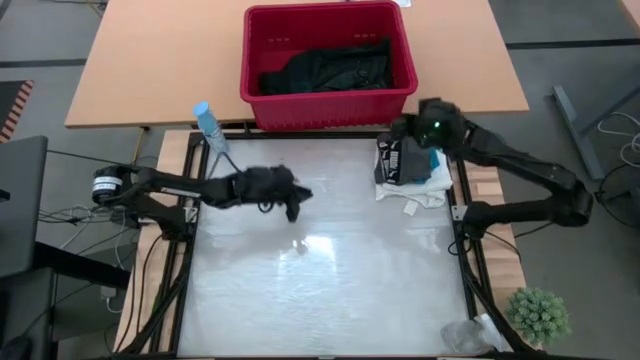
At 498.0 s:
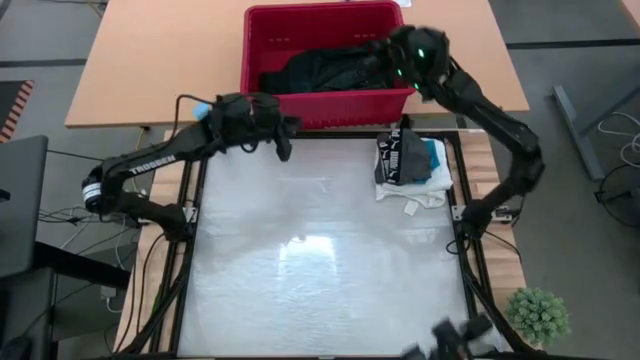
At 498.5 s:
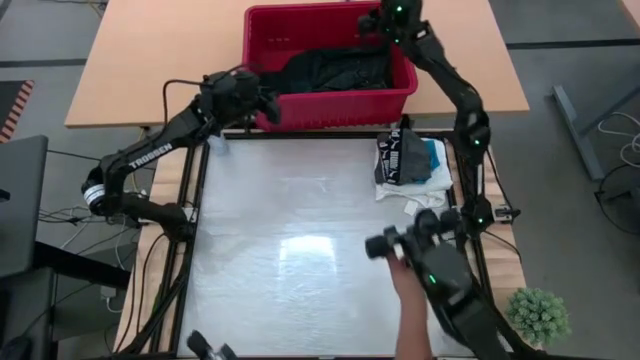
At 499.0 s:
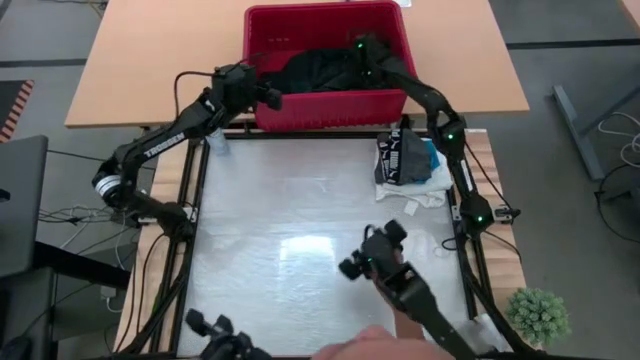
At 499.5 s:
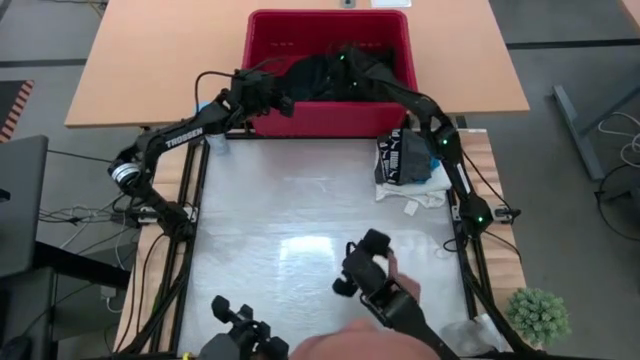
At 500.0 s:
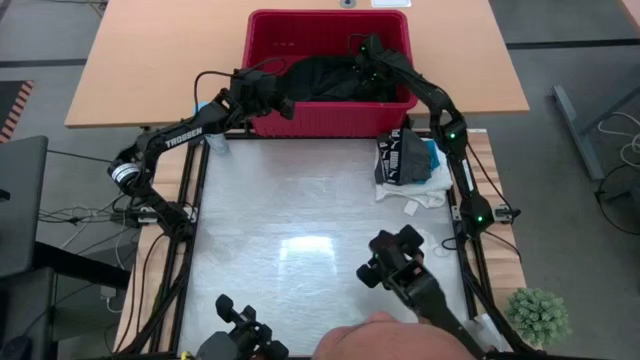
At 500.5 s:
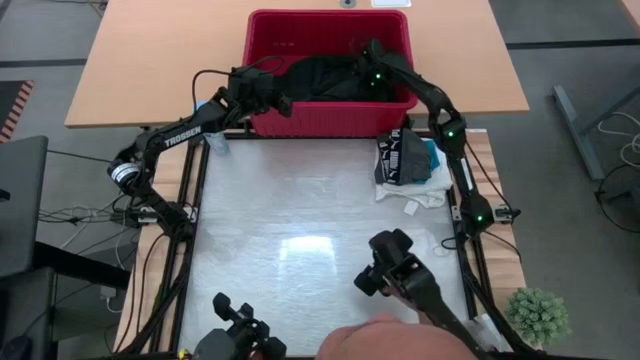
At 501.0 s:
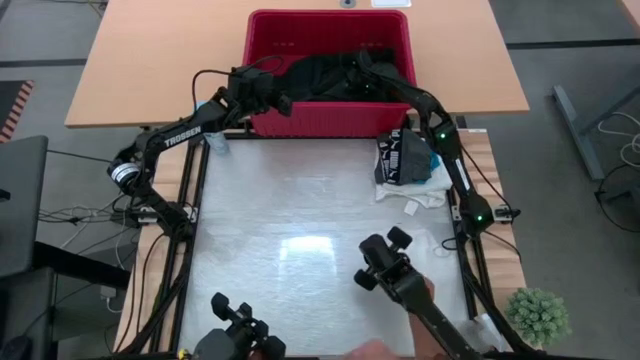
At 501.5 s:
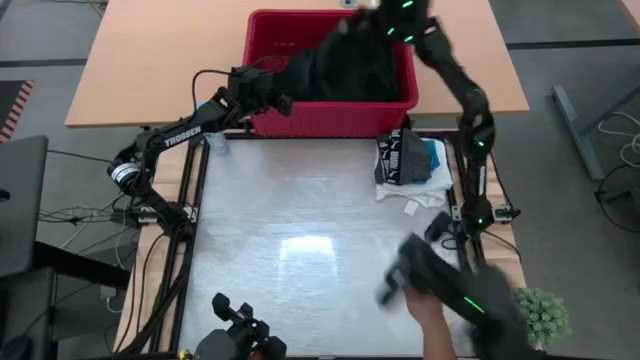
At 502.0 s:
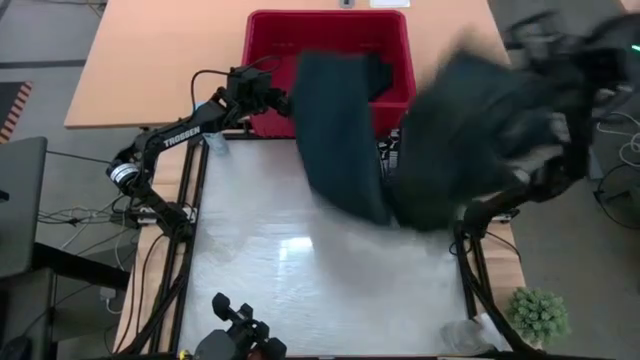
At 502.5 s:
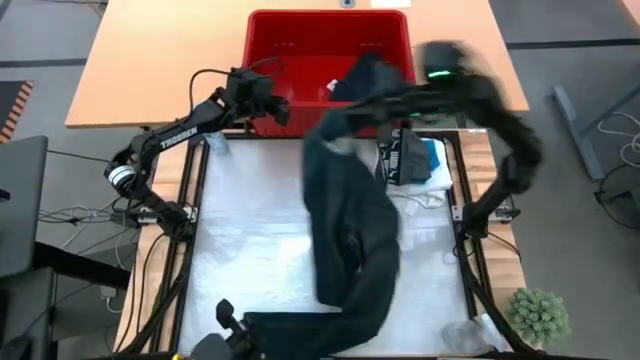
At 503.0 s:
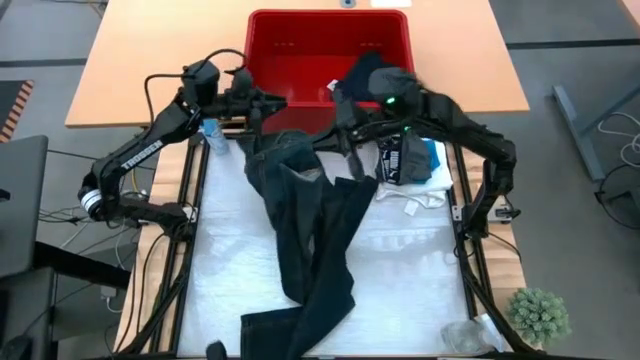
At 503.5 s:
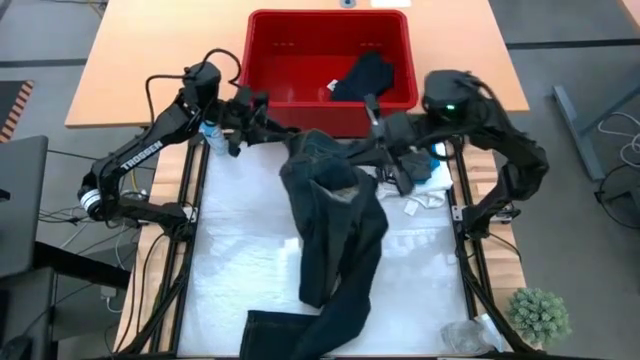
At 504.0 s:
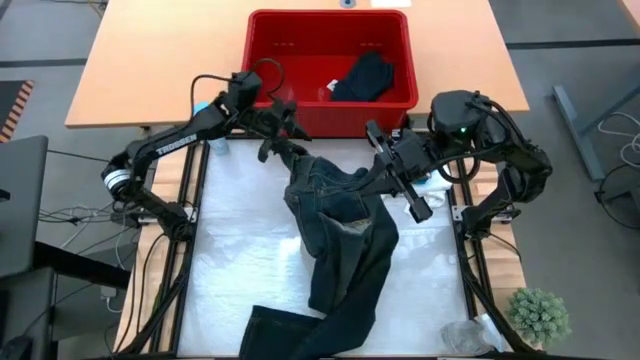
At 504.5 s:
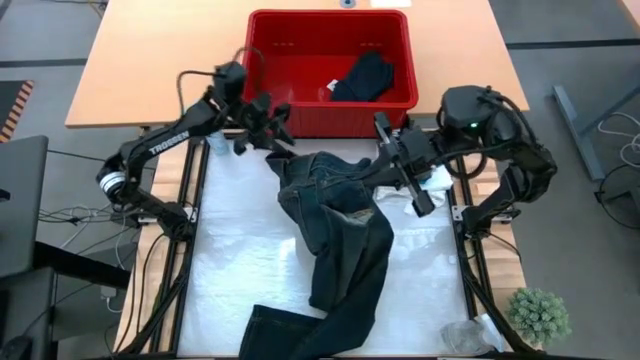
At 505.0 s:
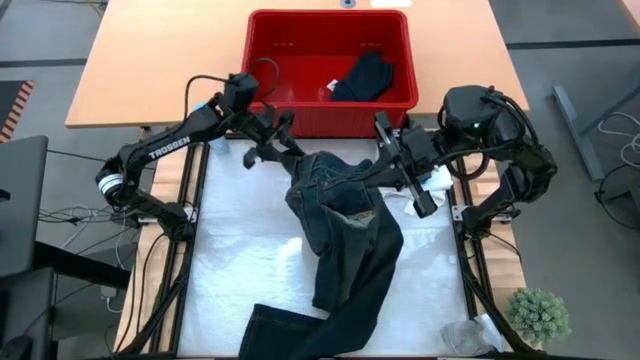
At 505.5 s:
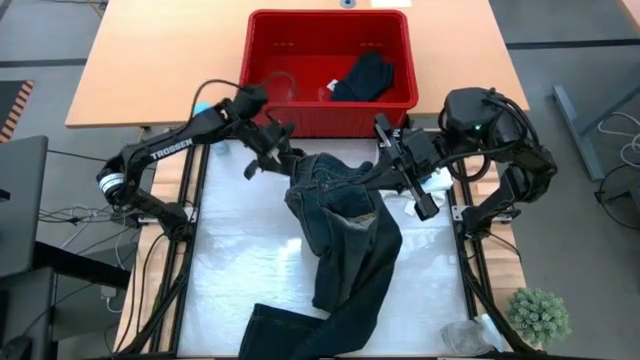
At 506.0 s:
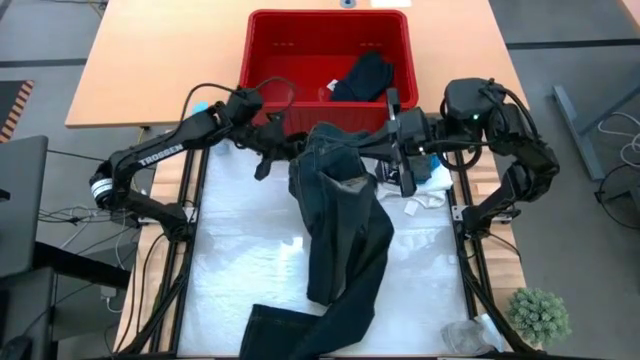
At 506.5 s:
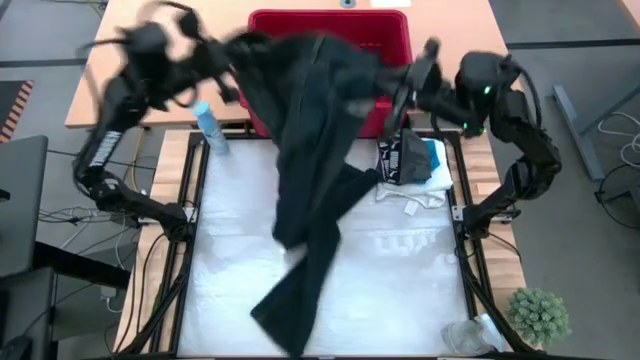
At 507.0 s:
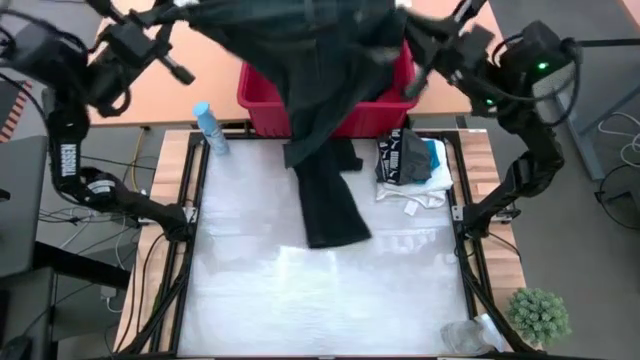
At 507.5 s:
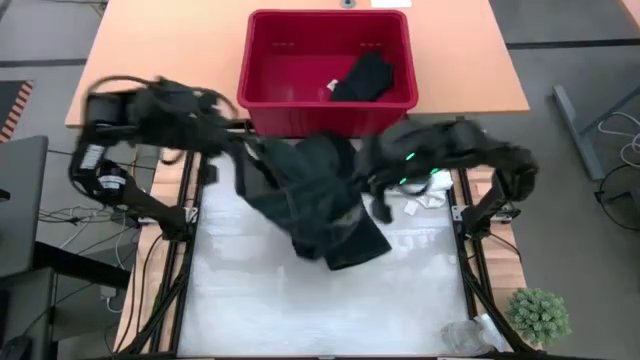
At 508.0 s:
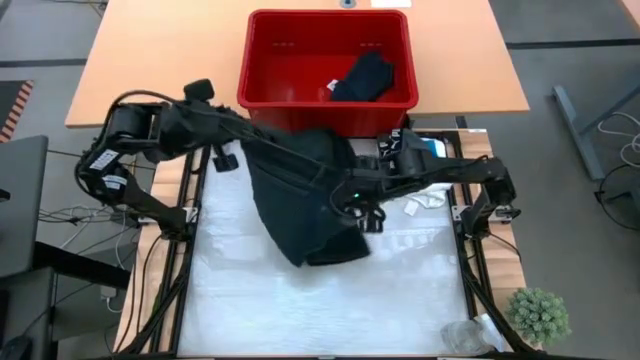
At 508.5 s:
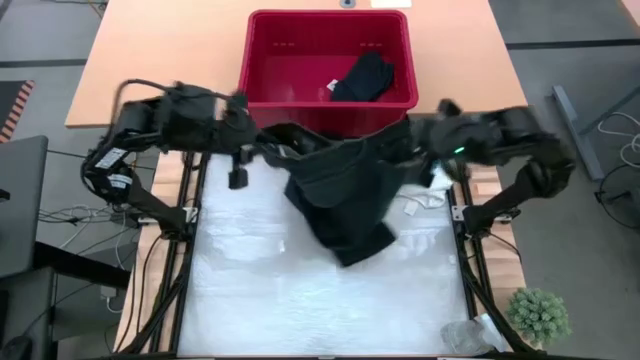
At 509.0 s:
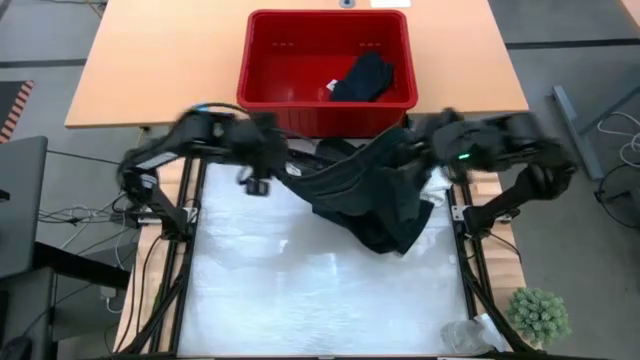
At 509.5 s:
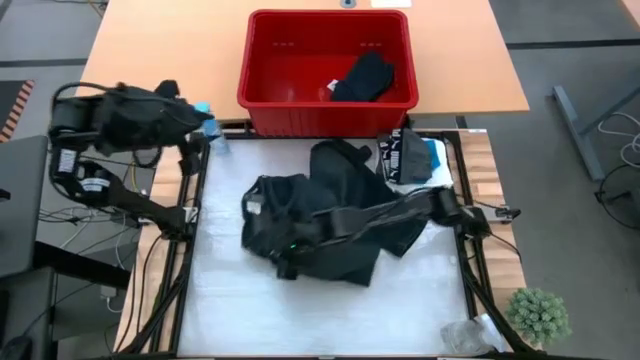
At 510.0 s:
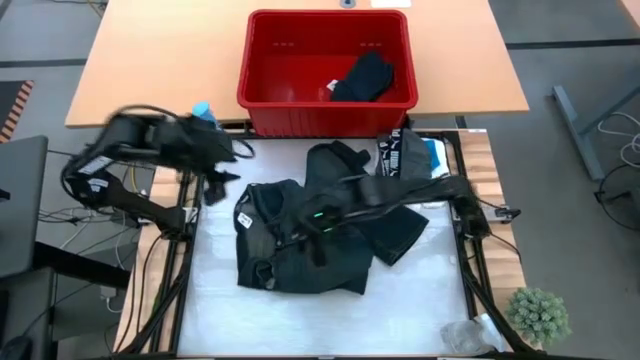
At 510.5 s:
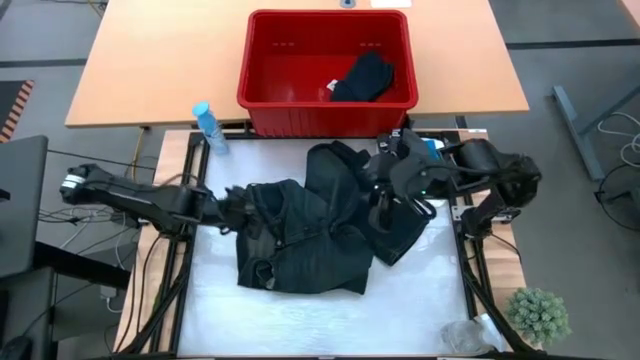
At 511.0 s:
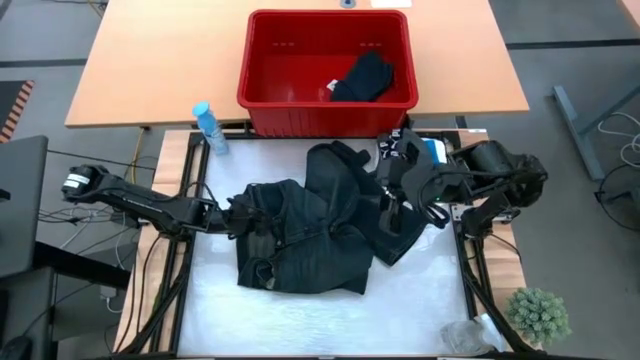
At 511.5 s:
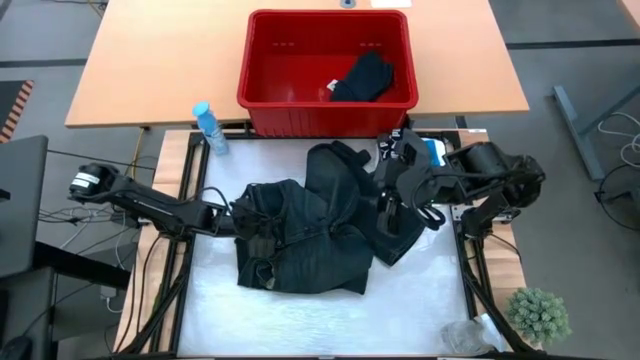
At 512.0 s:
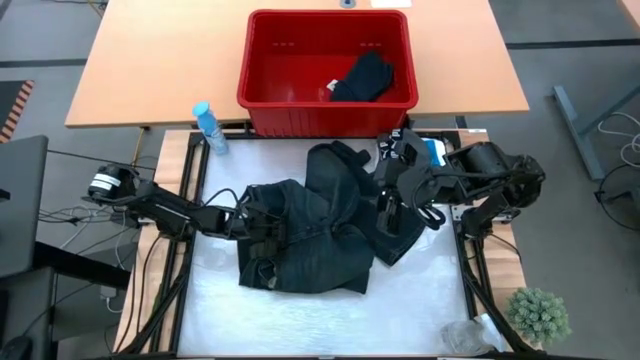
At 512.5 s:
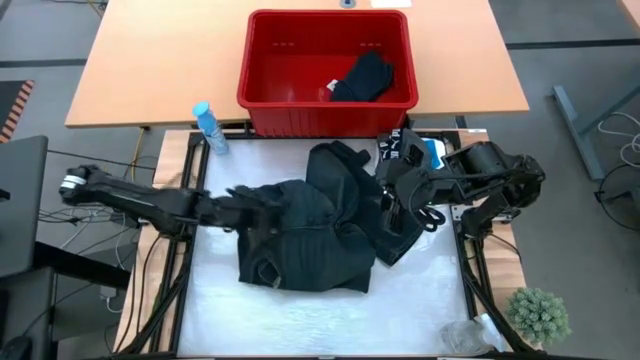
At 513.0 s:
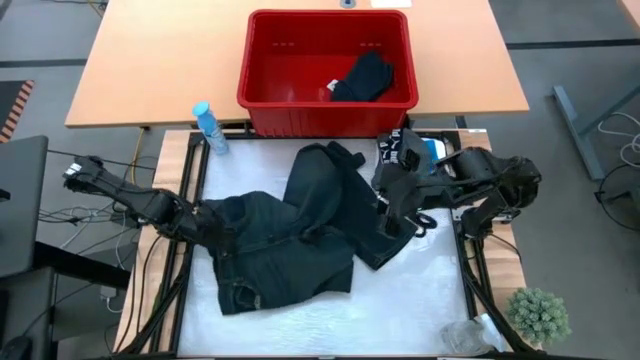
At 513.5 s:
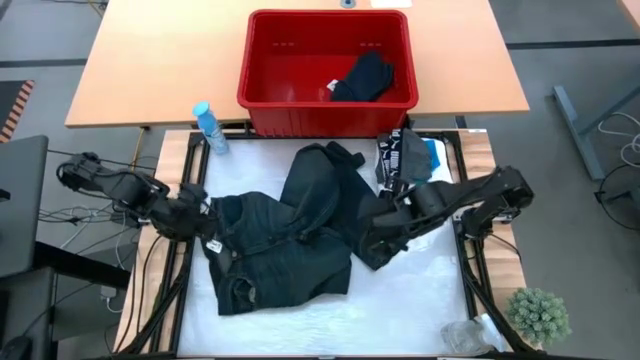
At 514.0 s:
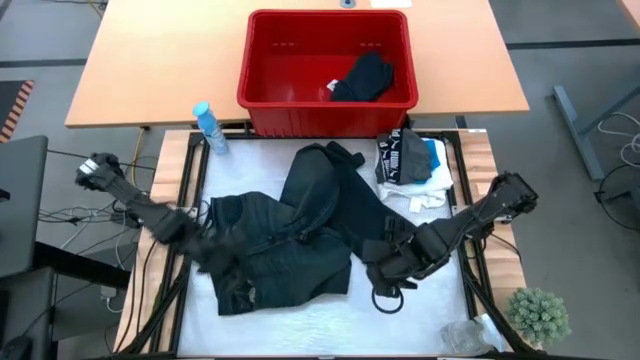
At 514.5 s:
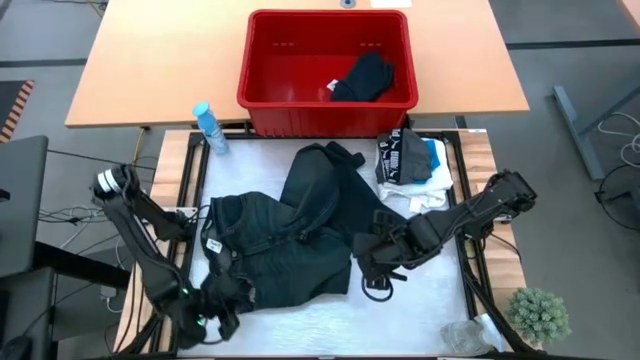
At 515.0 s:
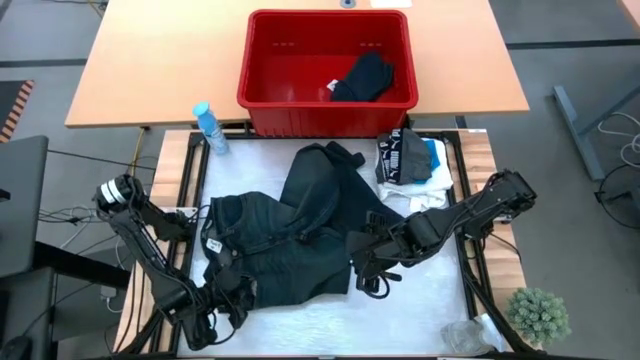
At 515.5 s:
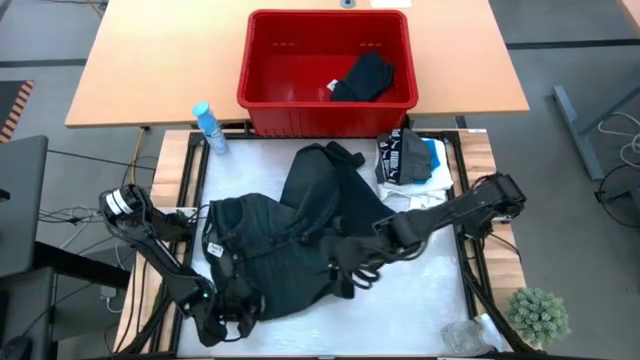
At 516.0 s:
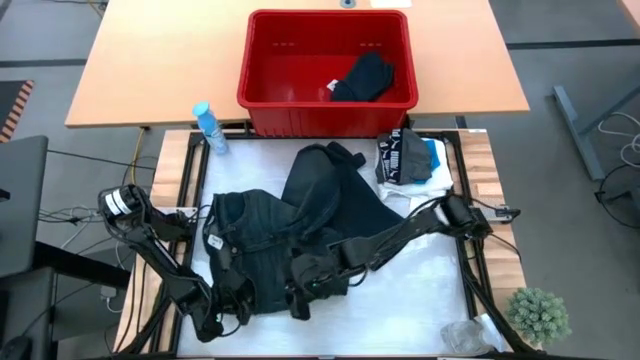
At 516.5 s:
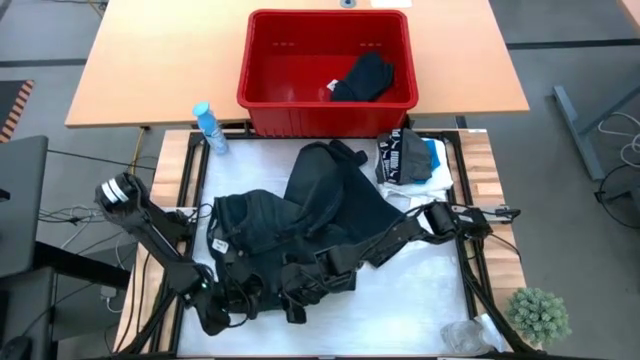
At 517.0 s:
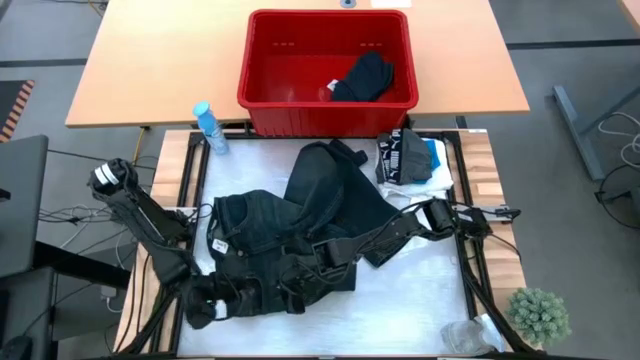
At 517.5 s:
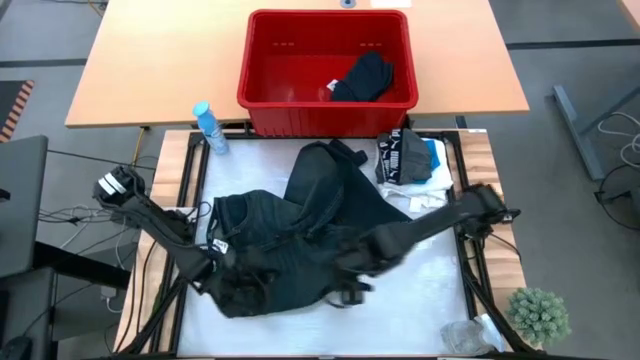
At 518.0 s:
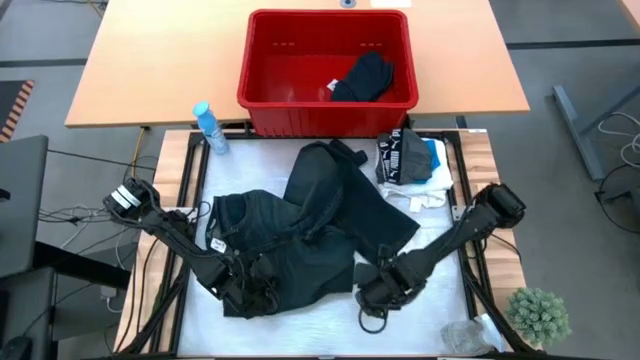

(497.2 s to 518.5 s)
Task: Fold laundry
Fold the blue pants

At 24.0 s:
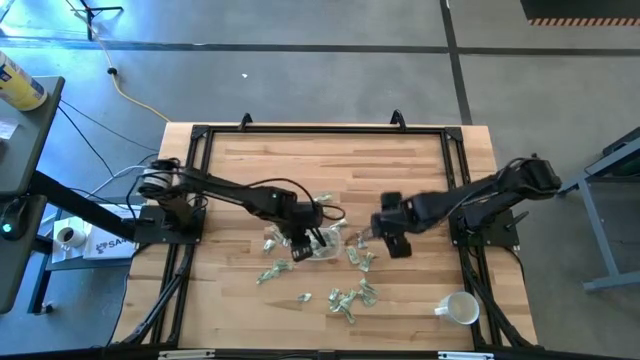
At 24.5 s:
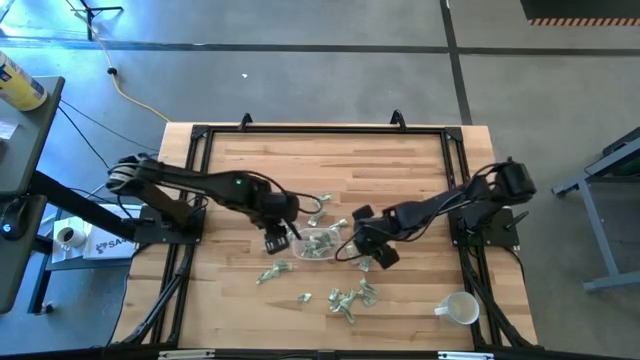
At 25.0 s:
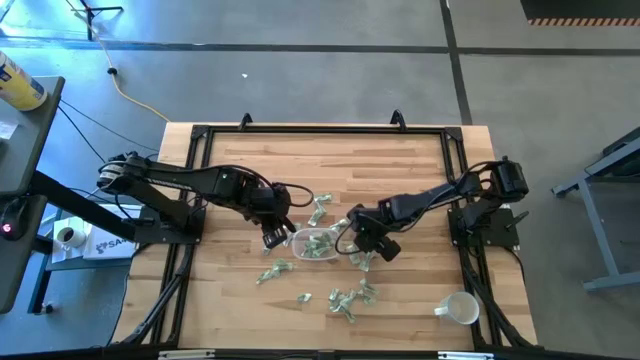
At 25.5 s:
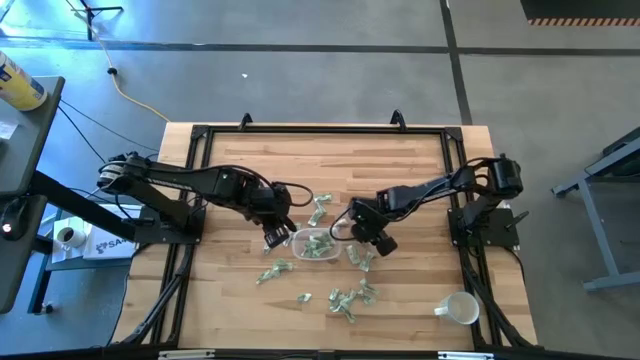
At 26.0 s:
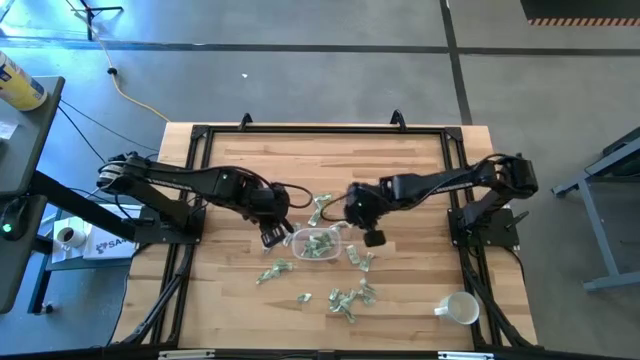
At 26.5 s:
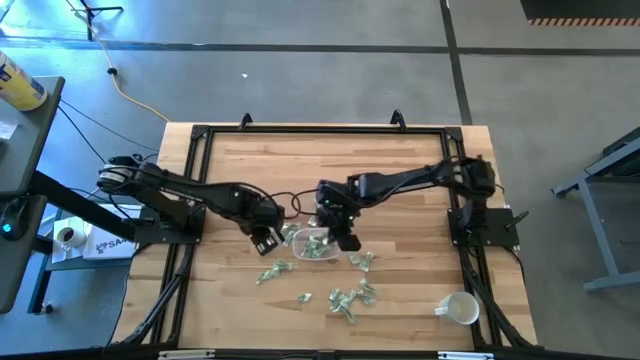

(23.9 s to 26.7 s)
Task: Pick and place Stevia / Truvia into bins
Put the green stevia packet into the transparent bin
